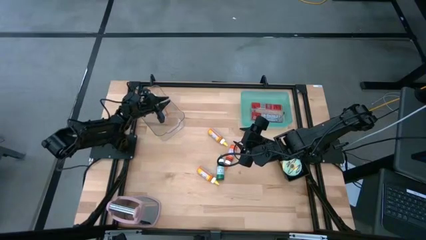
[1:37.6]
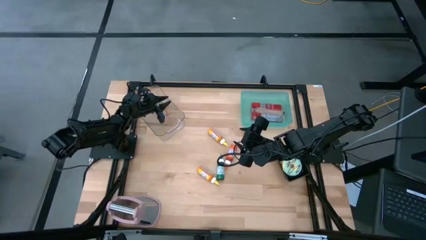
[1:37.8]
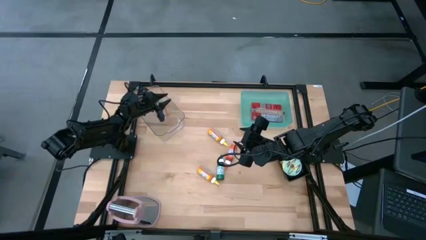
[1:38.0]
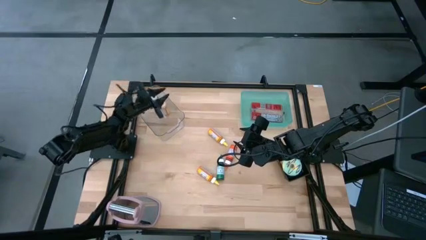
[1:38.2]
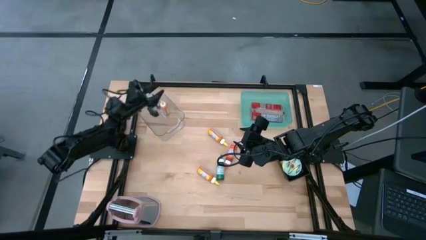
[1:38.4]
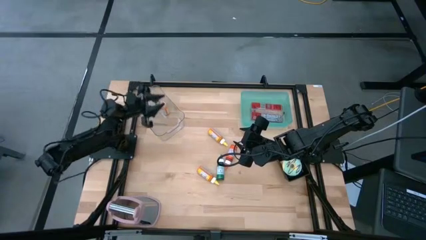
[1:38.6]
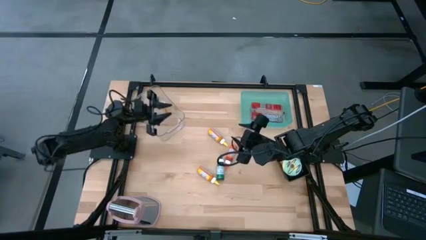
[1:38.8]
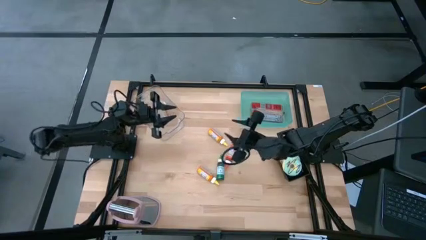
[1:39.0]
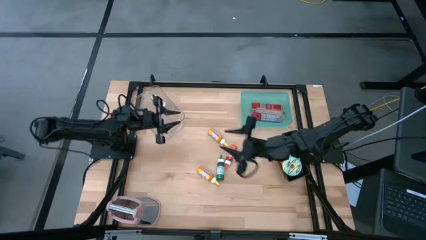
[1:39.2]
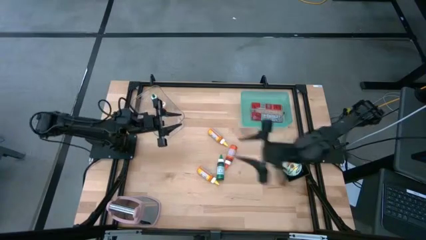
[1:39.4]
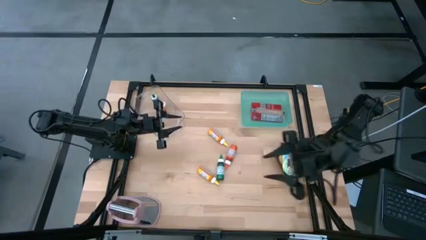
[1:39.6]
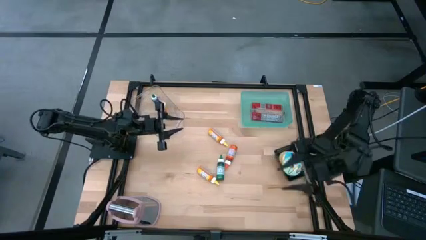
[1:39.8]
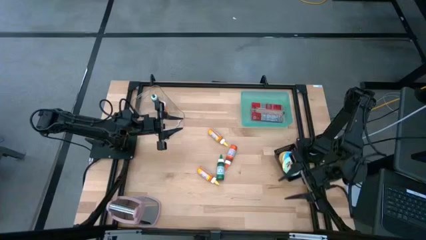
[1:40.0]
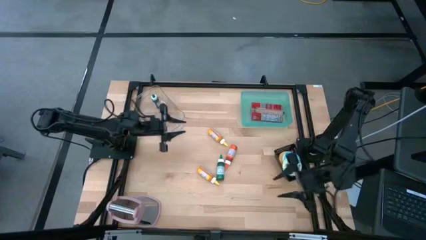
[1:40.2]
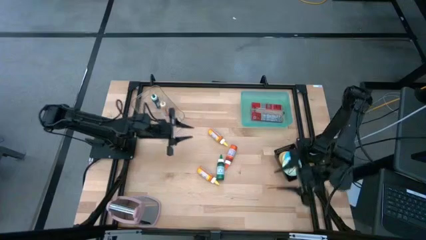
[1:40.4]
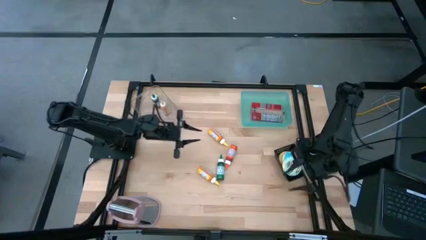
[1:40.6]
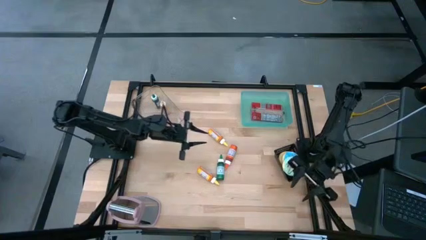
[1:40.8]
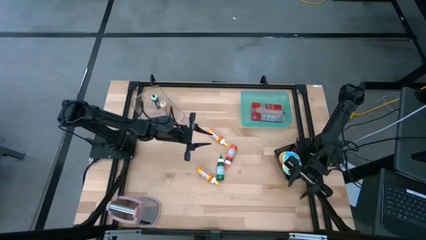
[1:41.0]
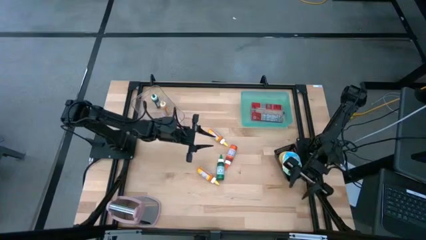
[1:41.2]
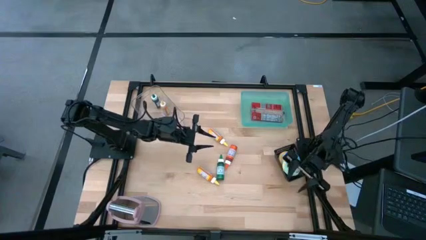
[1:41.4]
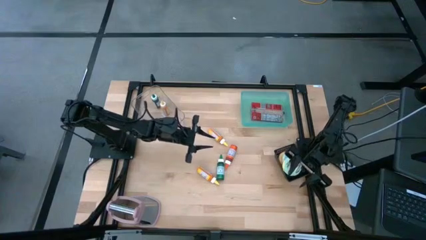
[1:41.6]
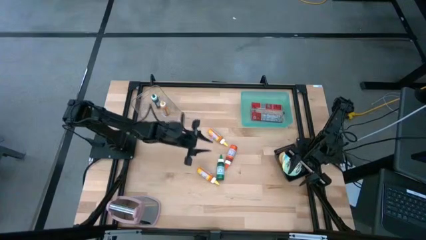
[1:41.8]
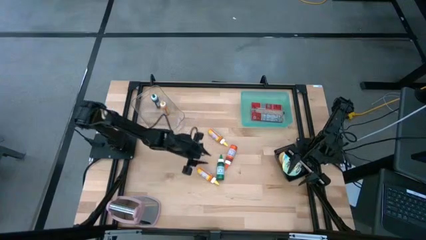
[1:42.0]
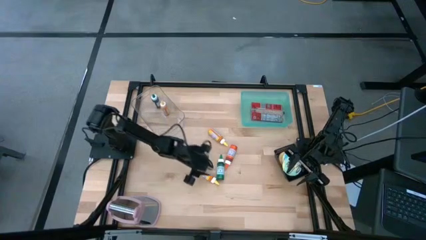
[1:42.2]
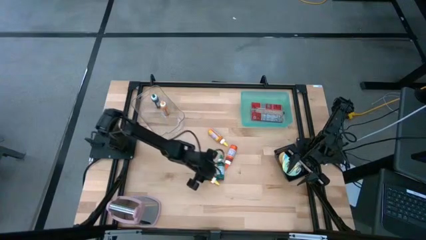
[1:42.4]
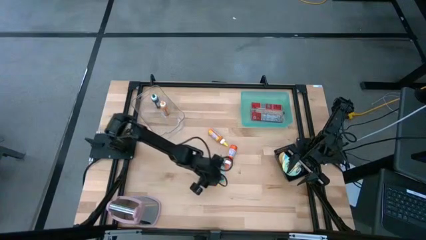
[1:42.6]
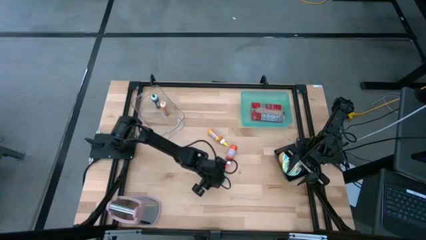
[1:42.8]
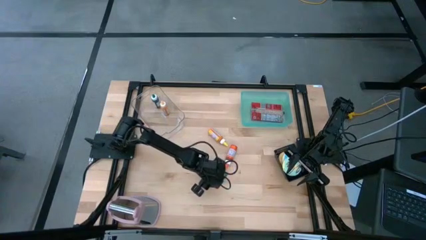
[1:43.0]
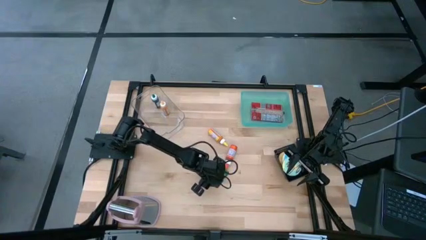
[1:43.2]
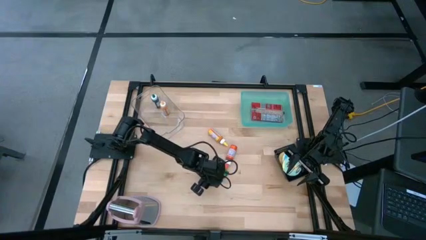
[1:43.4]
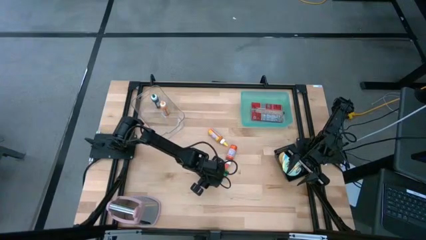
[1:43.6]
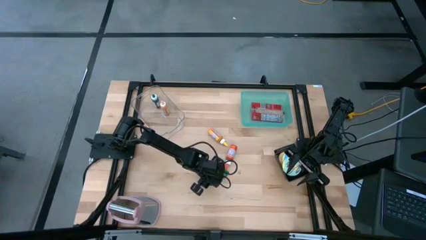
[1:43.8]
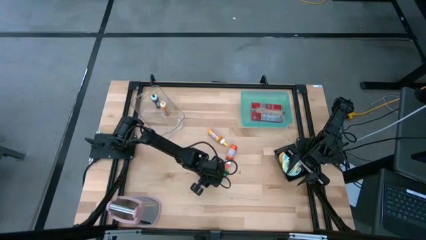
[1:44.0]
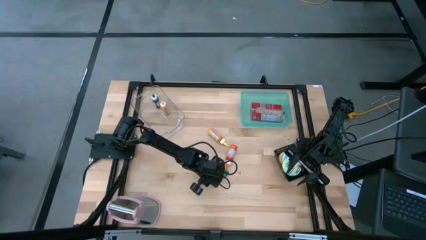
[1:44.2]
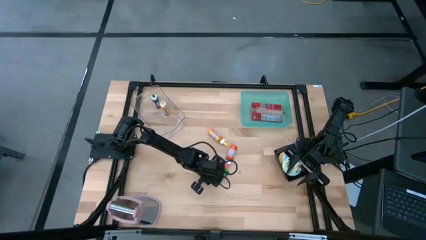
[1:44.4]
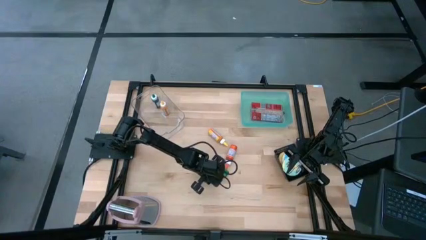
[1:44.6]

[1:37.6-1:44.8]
Put the bottom yellow food coloring bottle into the transparent bin

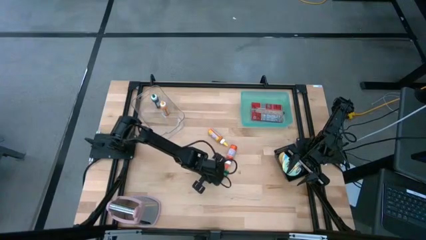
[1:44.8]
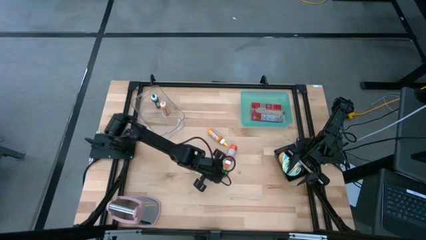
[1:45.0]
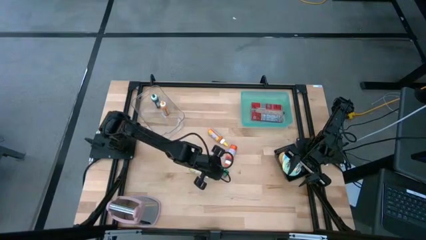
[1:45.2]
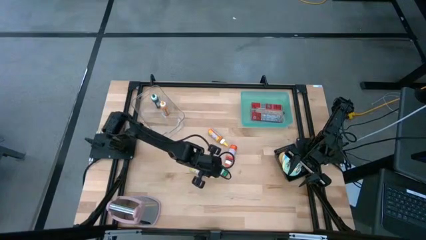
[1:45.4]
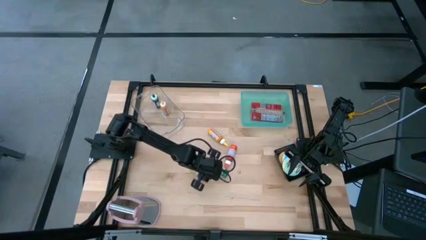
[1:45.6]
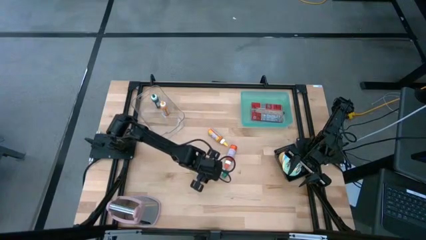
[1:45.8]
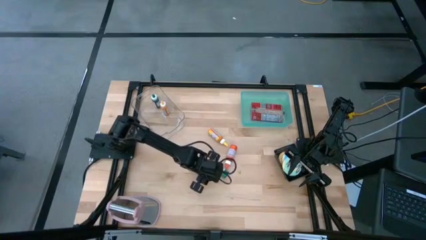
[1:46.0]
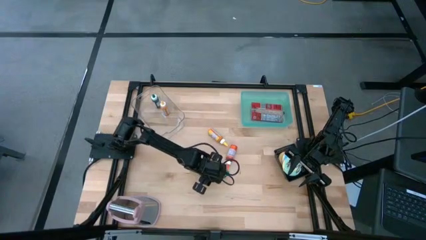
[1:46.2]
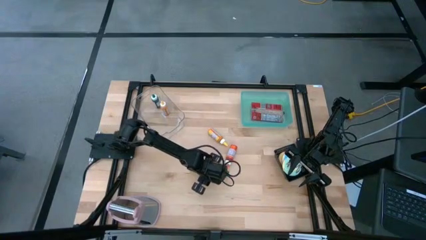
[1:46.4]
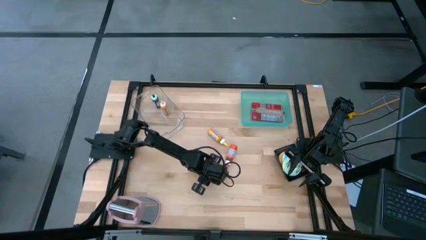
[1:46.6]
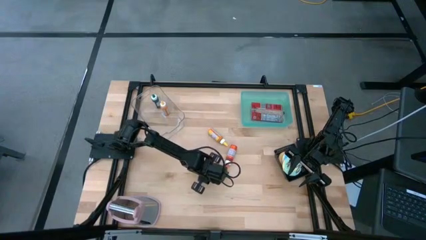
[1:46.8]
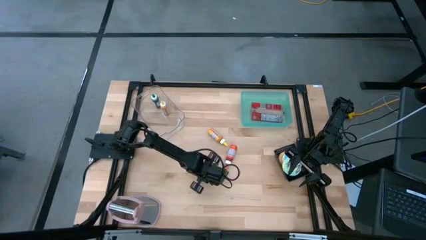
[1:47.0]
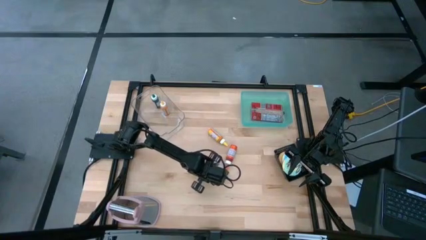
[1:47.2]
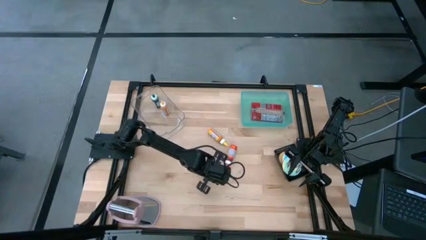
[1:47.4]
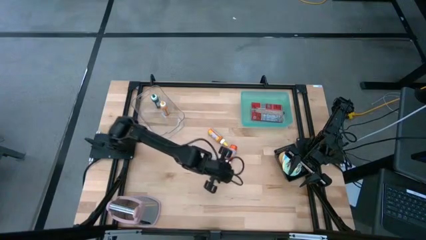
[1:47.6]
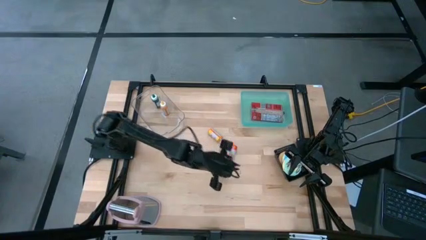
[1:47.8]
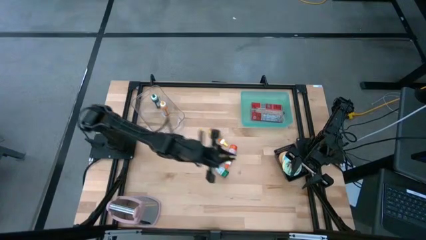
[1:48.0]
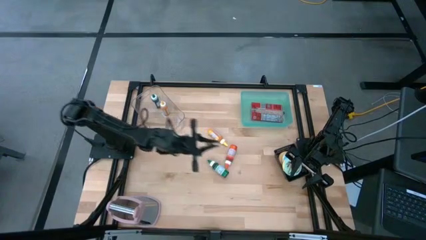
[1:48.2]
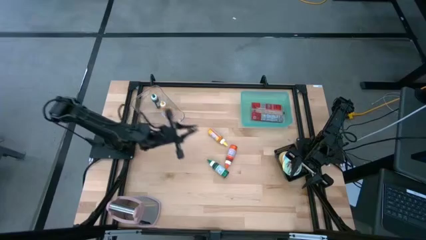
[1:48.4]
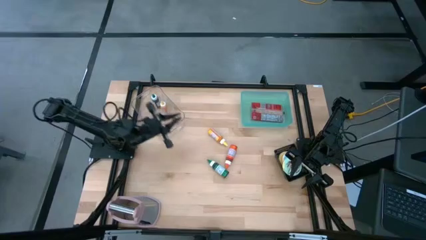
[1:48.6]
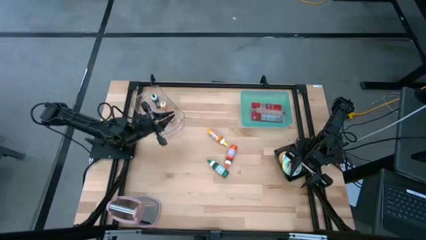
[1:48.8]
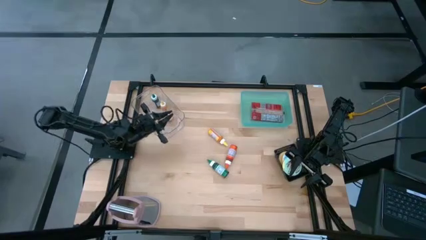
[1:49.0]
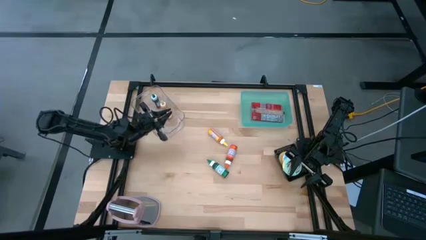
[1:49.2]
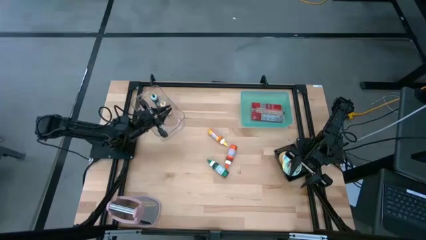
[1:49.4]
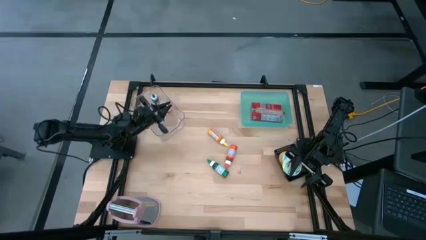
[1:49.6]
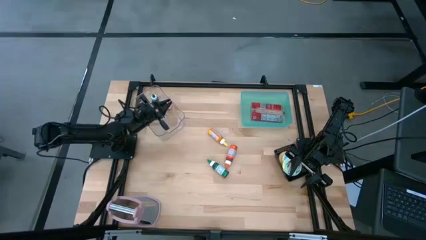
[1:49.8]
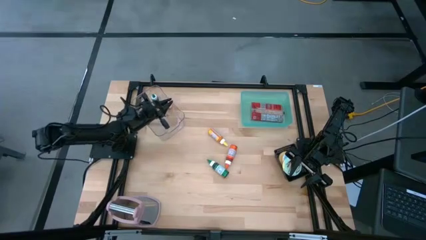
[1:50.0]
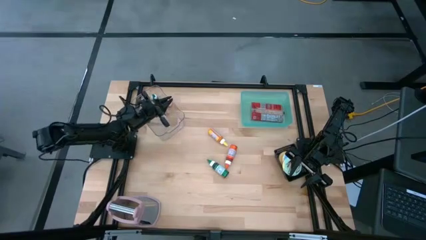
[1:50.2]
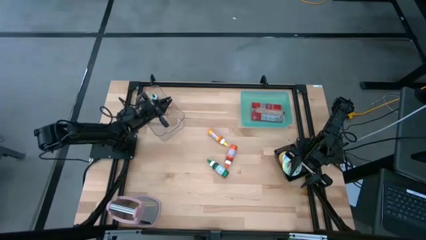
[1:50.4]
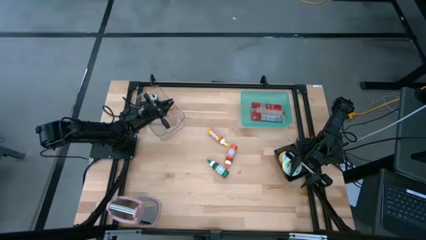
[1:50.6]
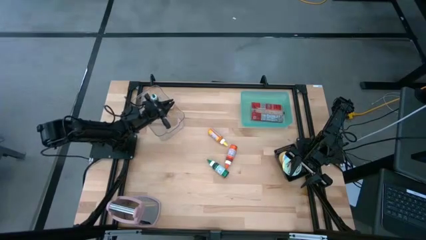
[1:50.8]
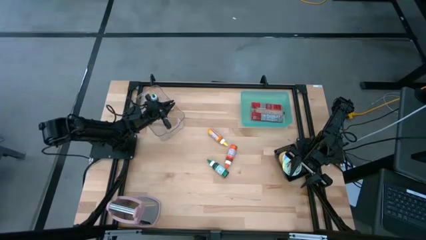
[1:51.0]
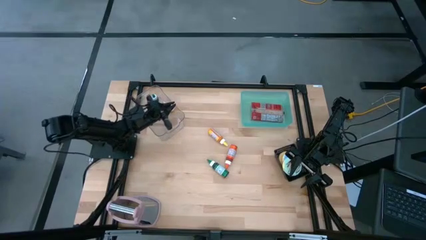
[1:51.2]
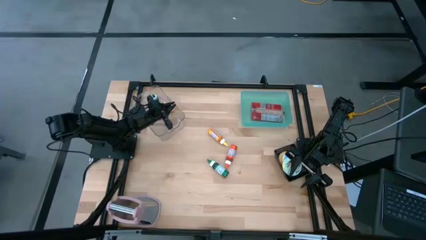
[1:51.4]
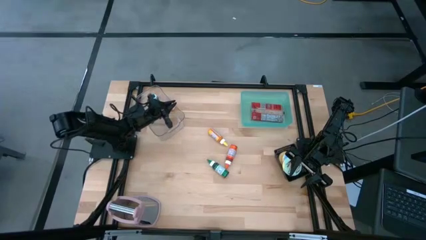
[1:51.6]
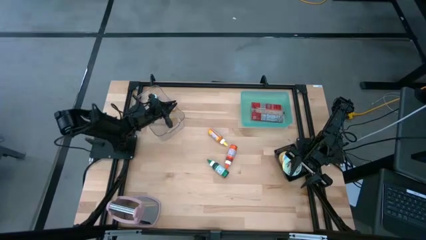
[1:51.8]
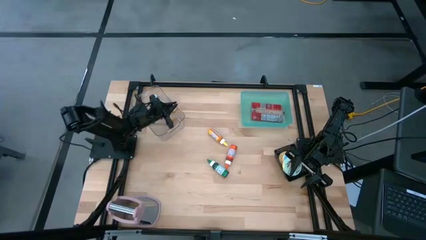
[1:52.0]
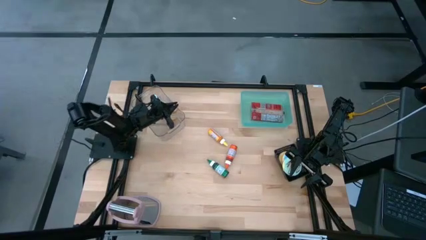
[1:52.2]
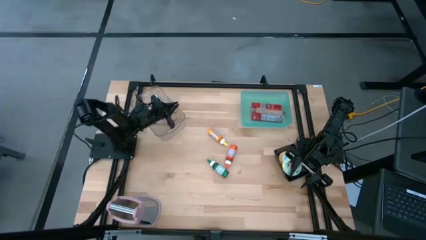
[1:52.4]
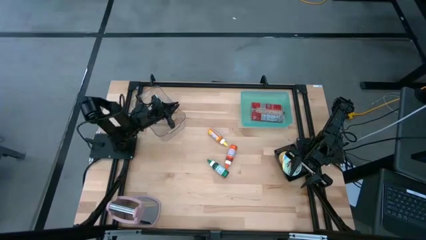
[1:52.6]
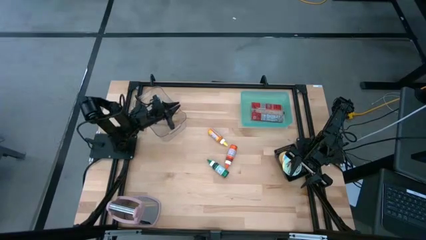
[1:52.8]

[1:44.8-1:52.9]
Put the bottom yellow food coloring bottle into the transparent bin
